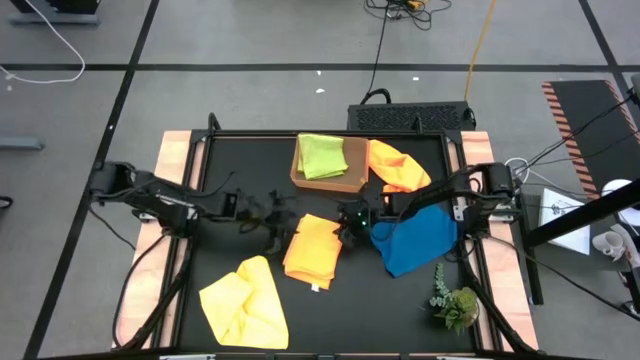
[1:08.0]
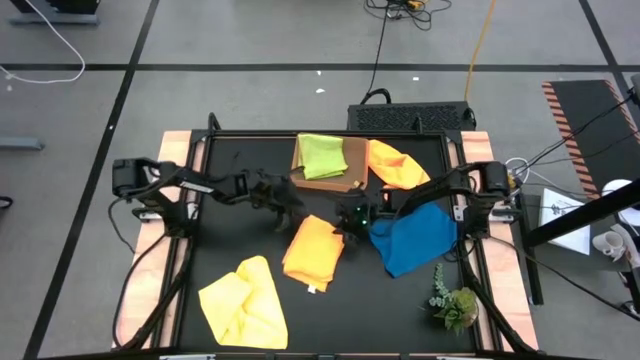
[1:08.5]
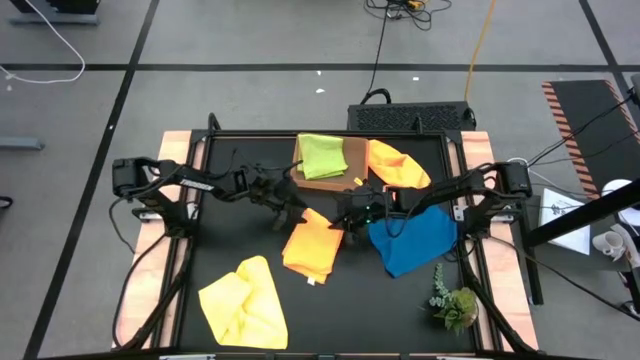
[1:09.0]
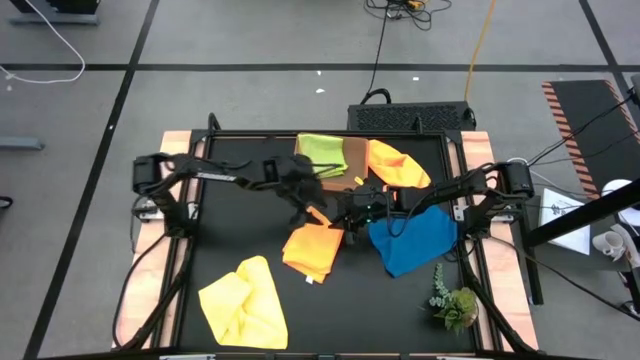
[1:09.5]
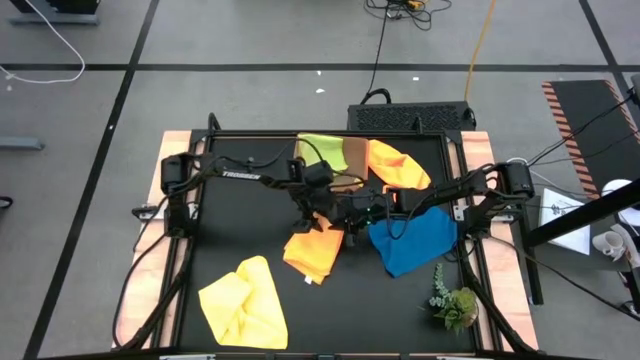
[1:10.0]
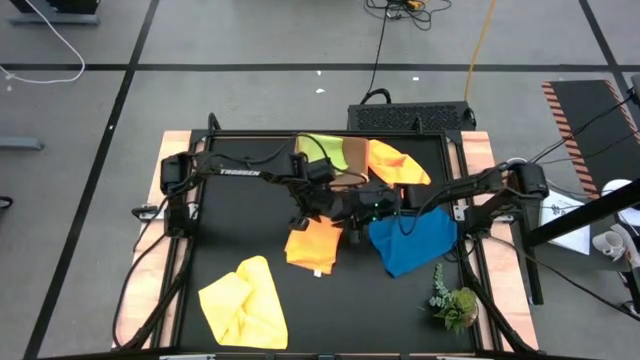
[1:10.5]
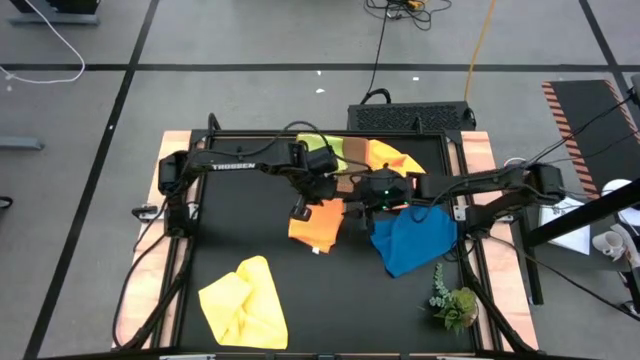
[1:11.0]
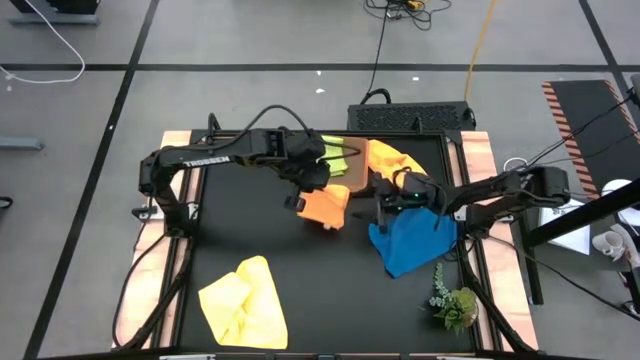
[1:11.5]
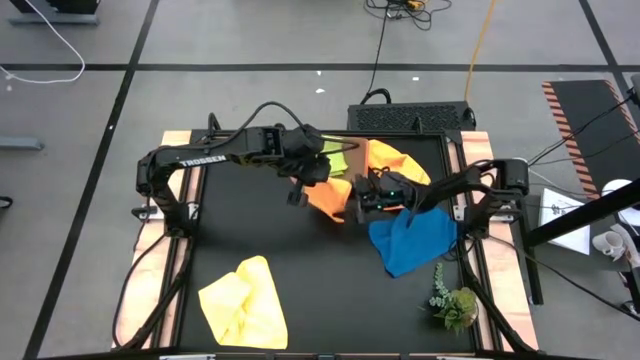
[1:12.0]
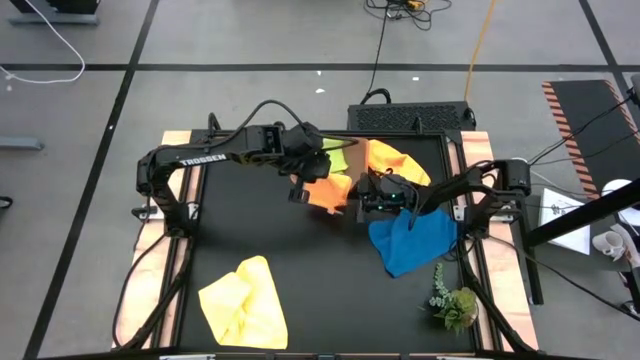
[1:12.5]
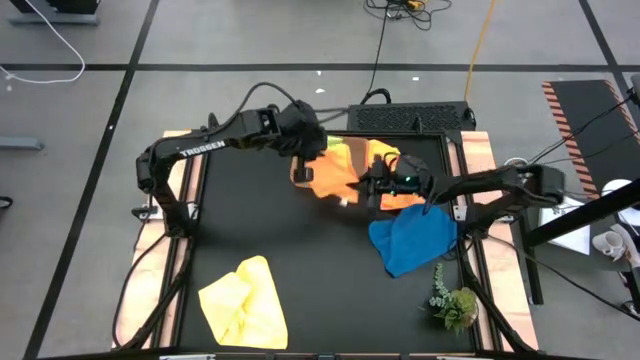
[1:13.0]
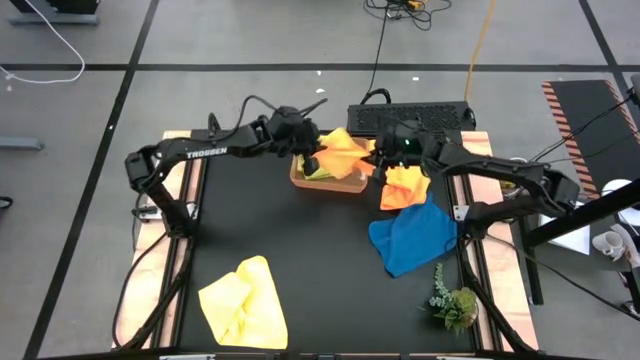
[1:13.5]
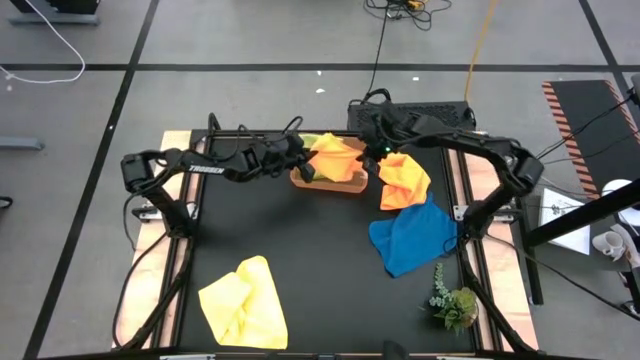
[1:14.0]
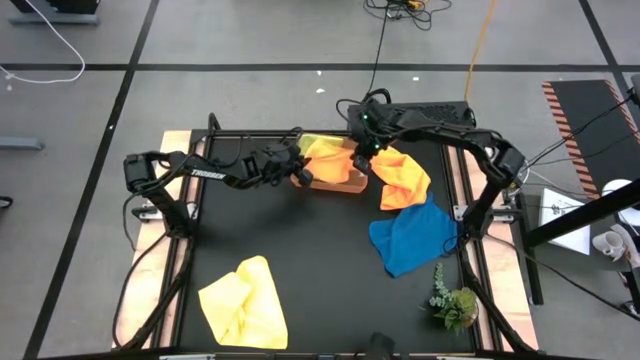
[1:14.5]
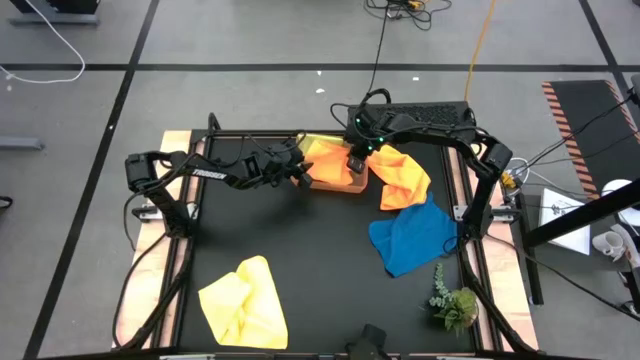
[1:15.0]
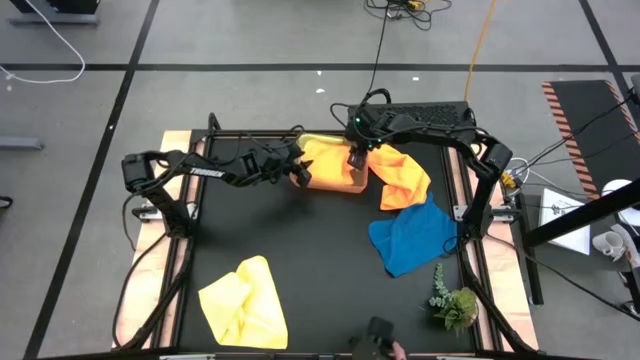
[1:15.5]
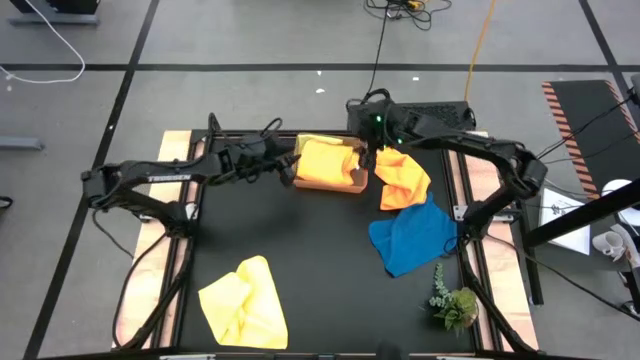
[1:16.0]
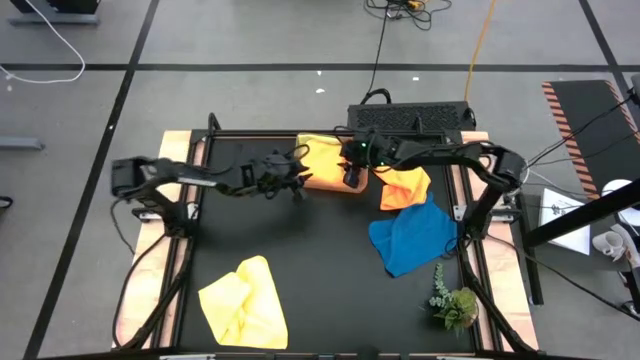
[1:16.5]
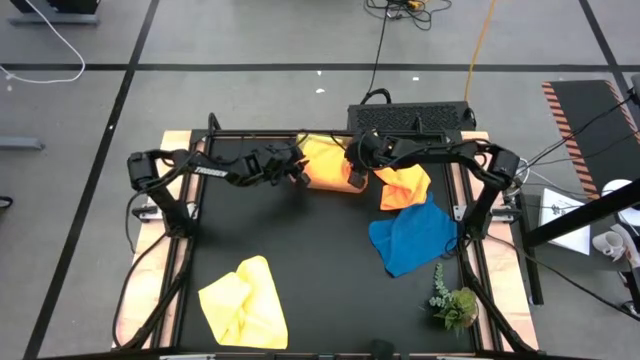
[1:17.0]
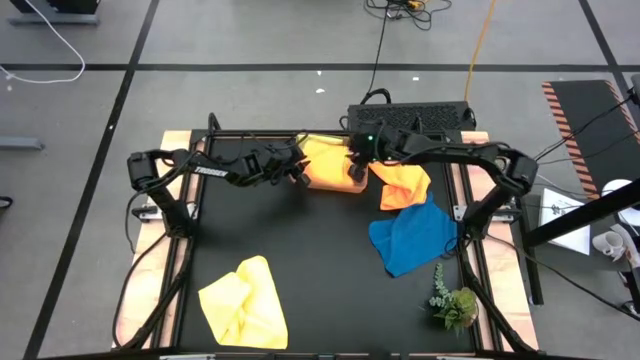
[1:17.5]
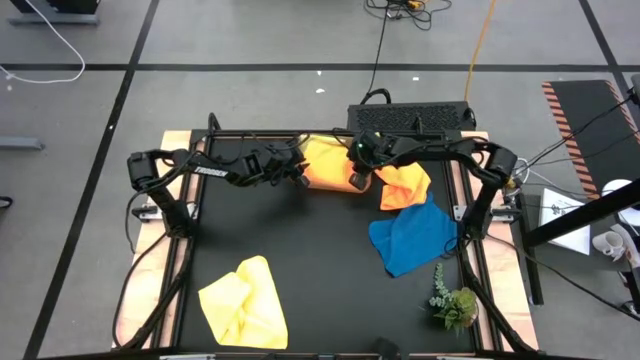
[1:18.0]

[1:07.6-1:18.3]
Task: Fold microfiber towels
Put the orange microfiber cloth into the orange bin

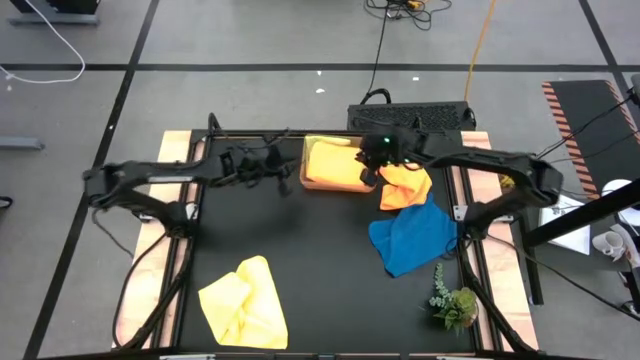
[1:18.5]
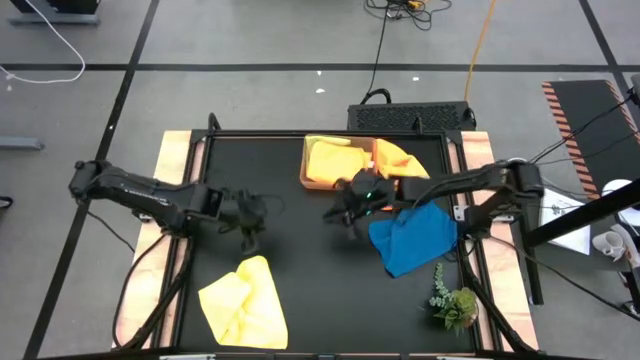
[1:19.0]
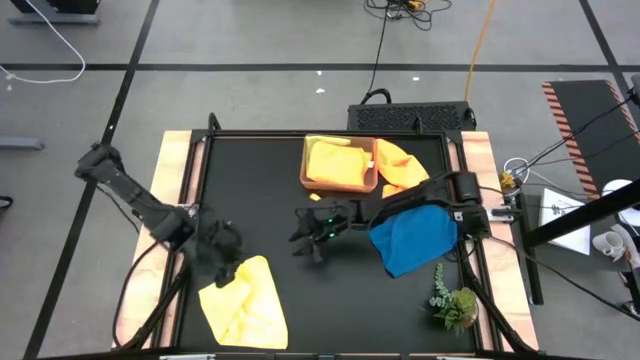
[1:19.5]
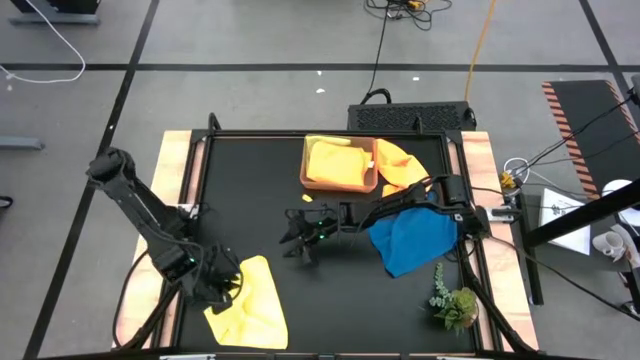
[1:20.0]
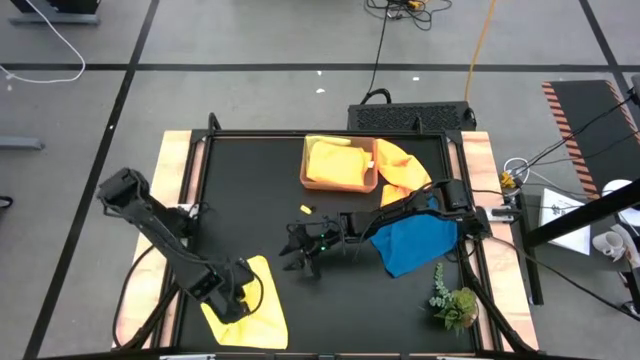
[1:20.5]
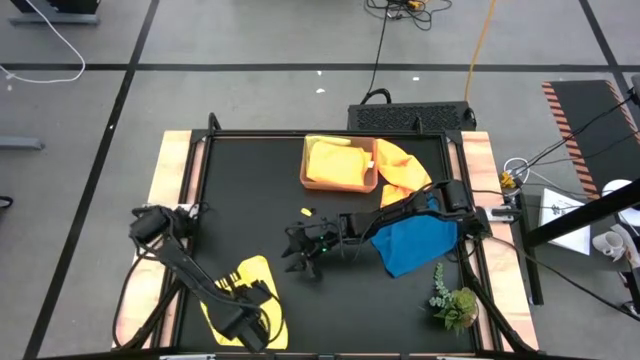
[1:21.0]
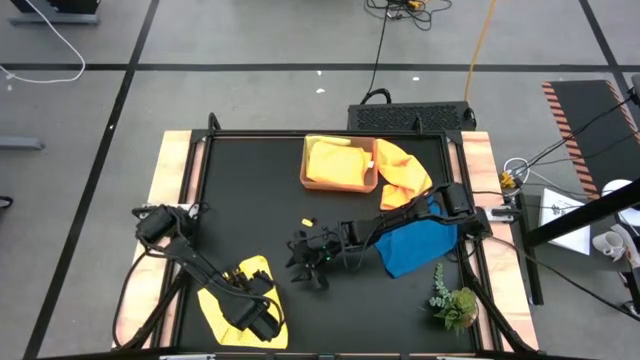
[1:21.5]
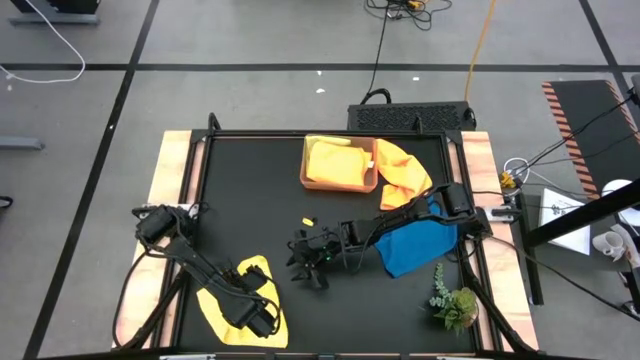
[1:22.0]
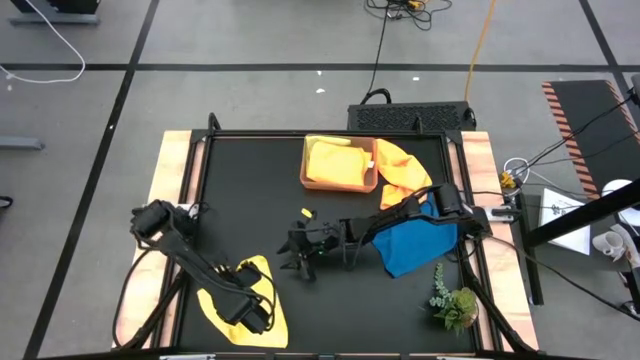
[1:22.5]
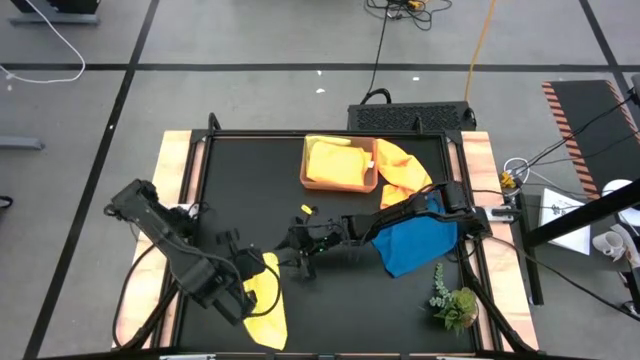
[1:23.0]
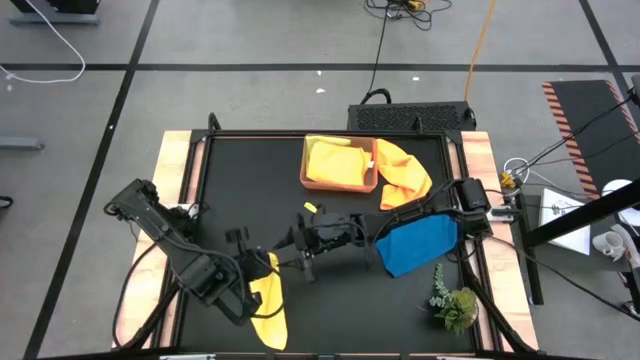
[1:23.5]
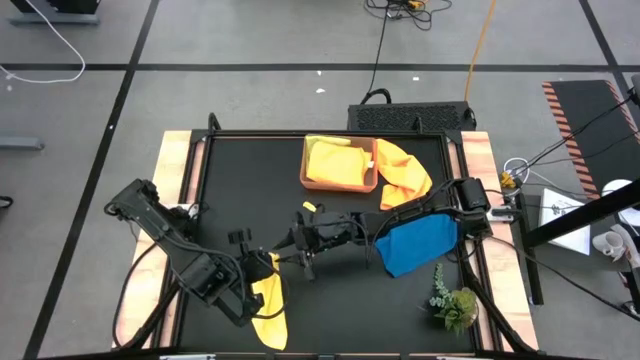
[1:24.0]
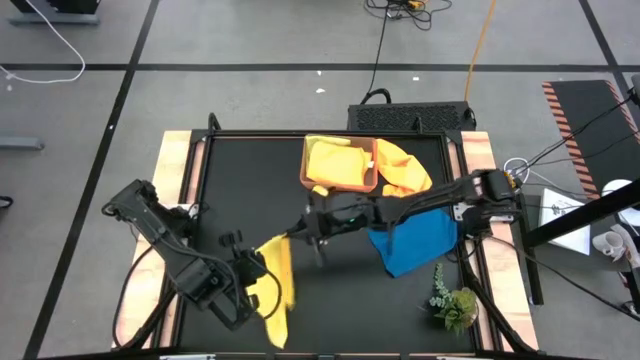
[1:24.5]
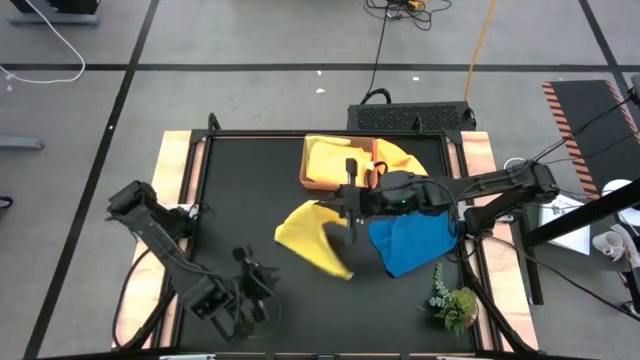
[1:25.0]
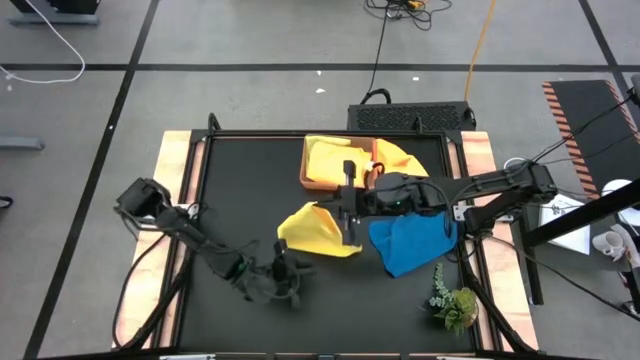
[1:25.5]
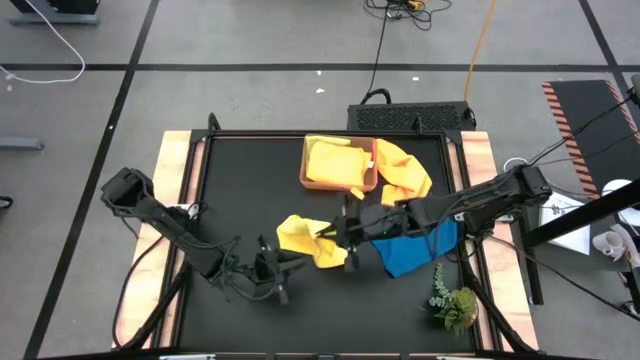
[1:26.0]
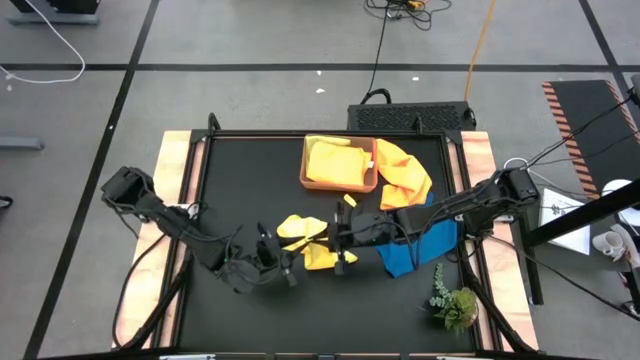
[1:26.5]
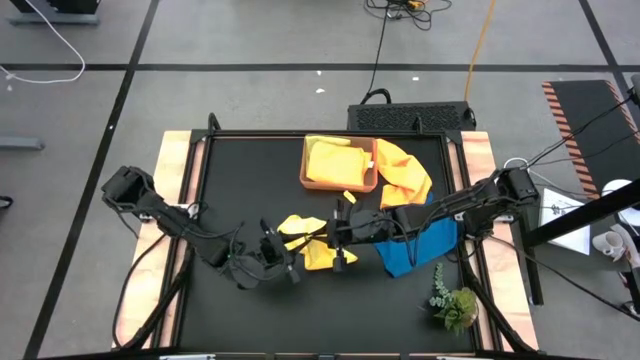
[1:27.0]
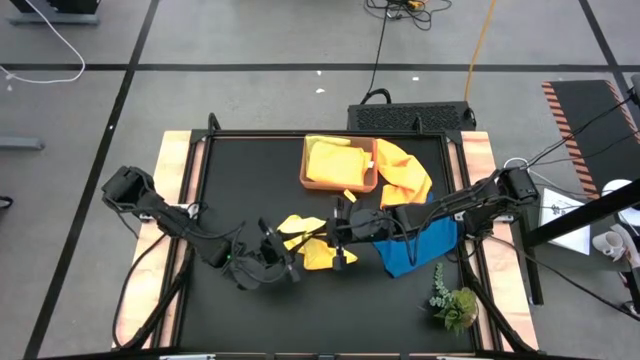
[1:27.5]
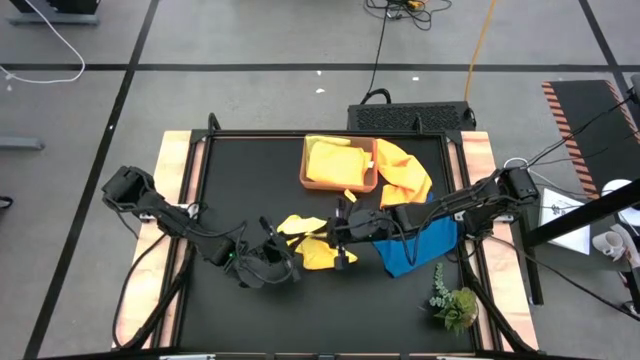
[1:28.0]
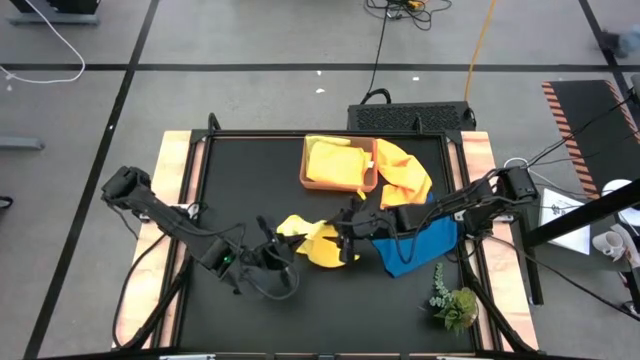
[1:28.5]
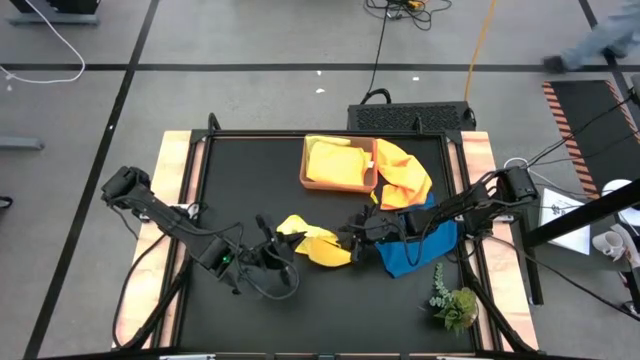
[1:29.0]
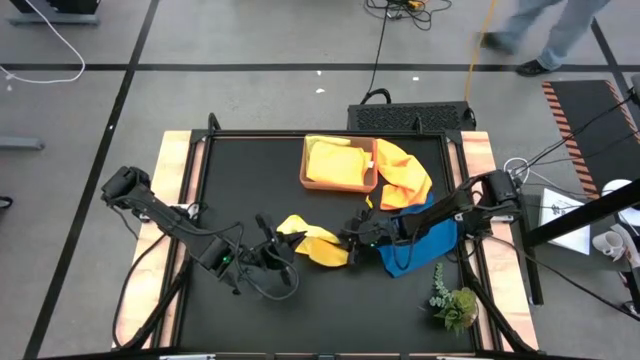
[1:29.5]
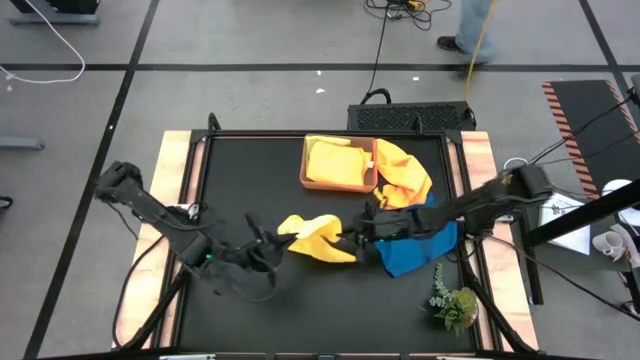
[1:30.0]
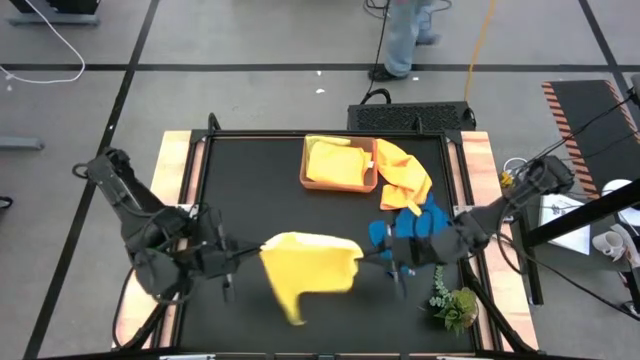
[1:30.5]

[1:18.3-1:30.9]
Fold the yellow microfiber cloth
